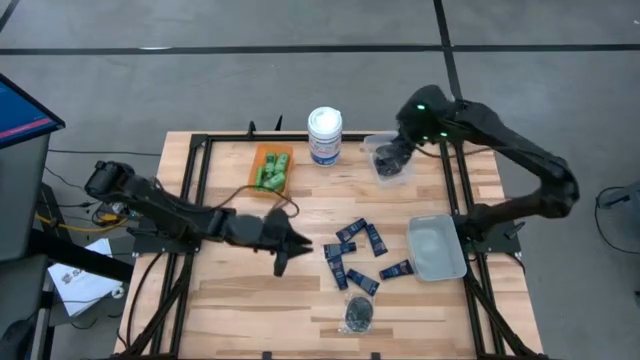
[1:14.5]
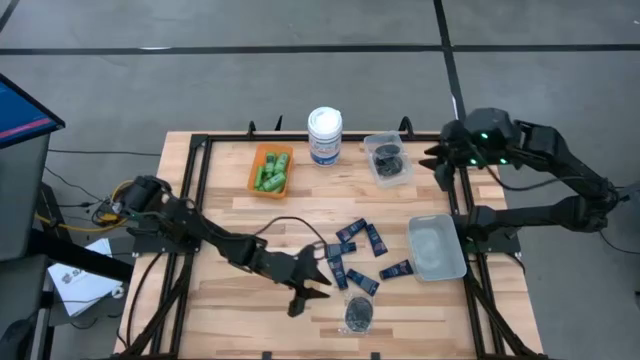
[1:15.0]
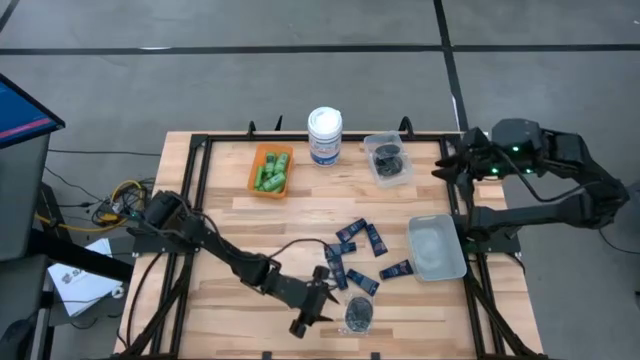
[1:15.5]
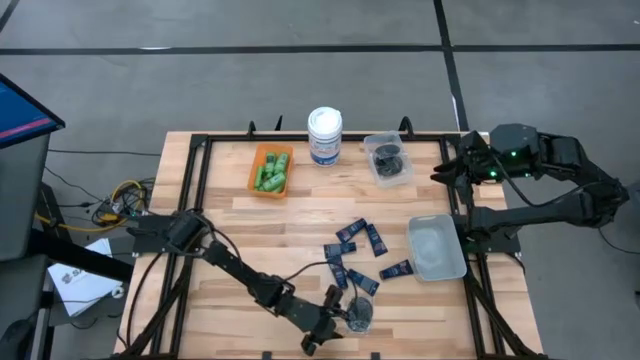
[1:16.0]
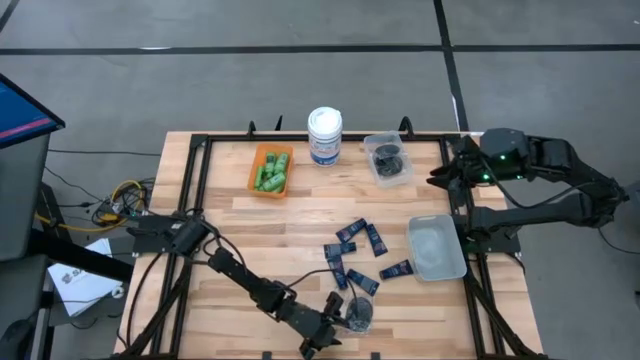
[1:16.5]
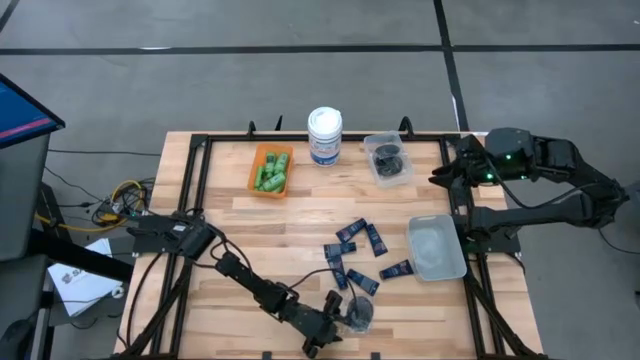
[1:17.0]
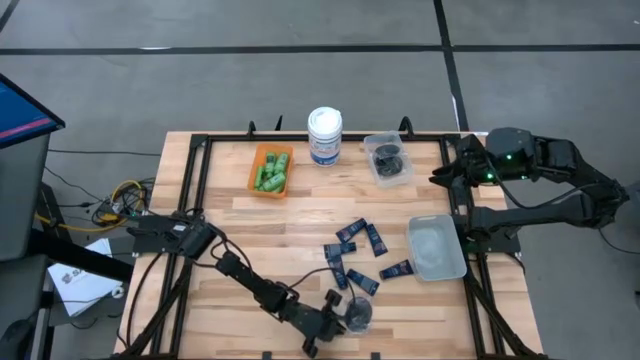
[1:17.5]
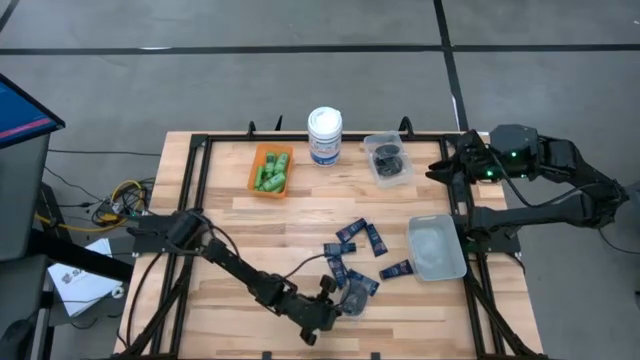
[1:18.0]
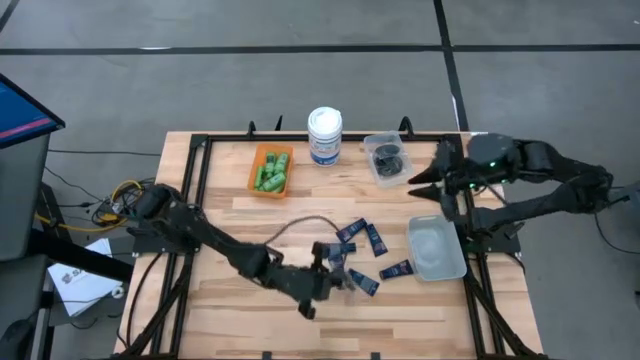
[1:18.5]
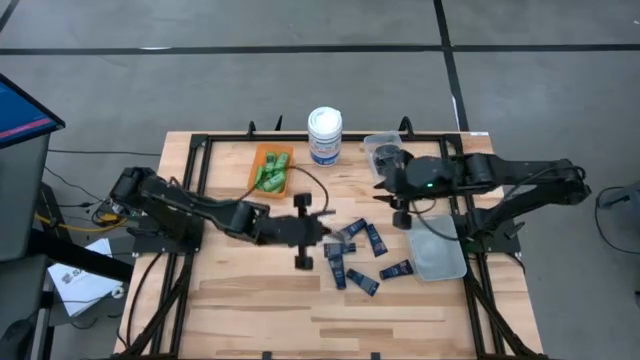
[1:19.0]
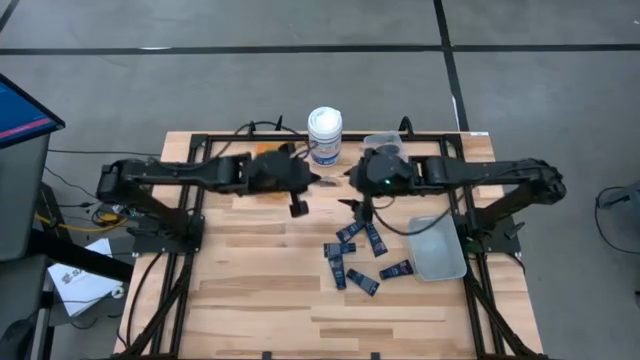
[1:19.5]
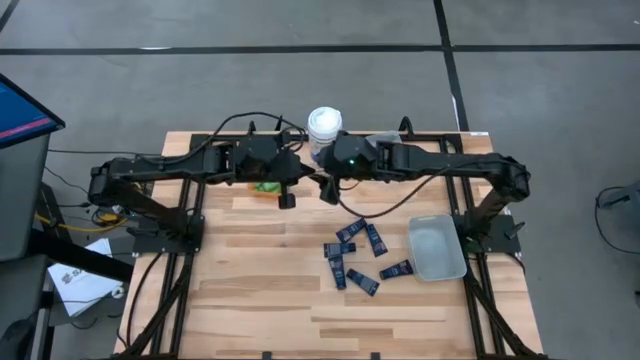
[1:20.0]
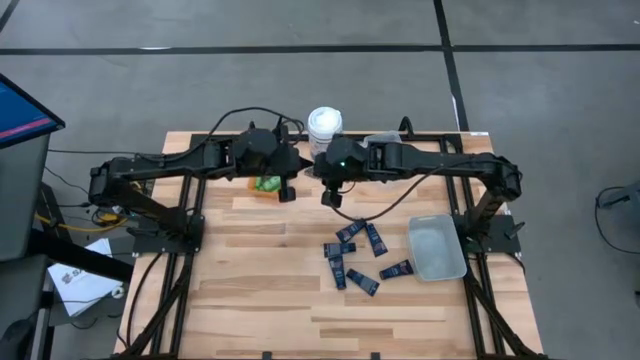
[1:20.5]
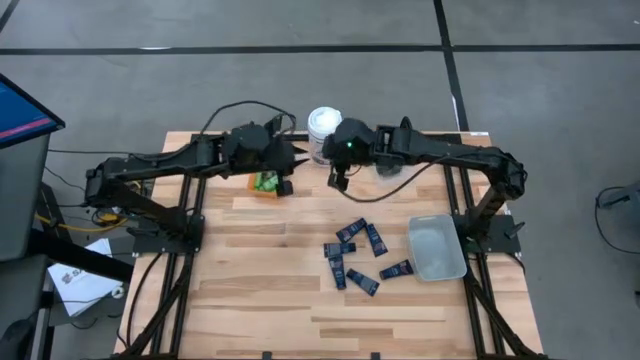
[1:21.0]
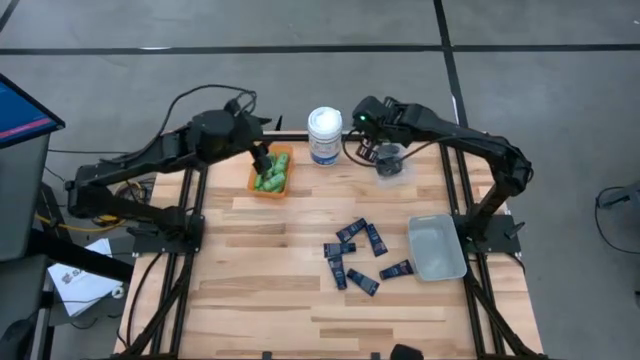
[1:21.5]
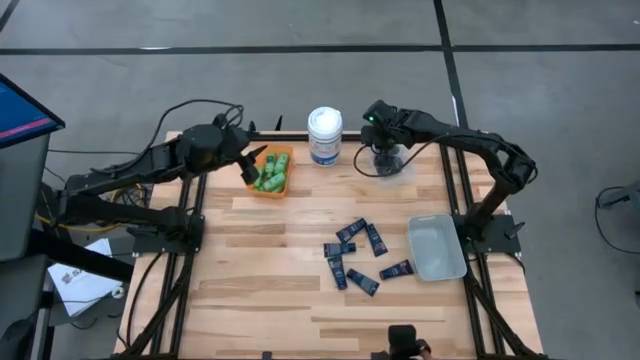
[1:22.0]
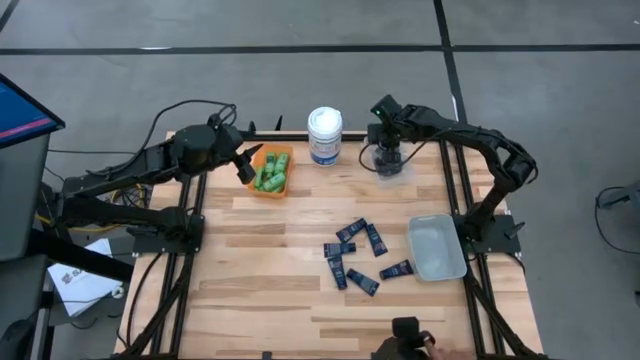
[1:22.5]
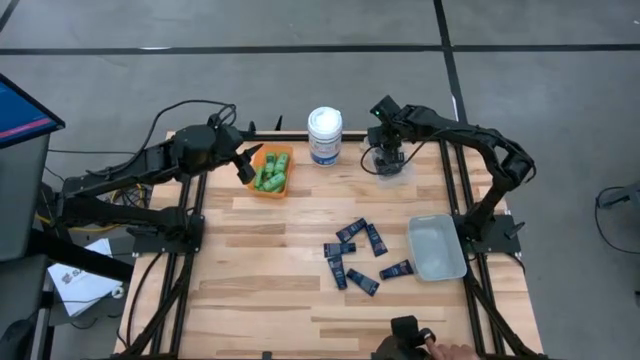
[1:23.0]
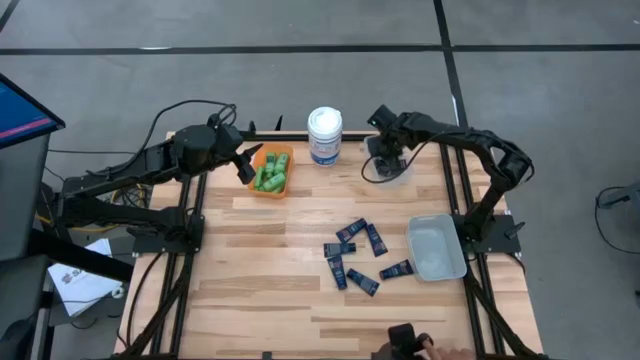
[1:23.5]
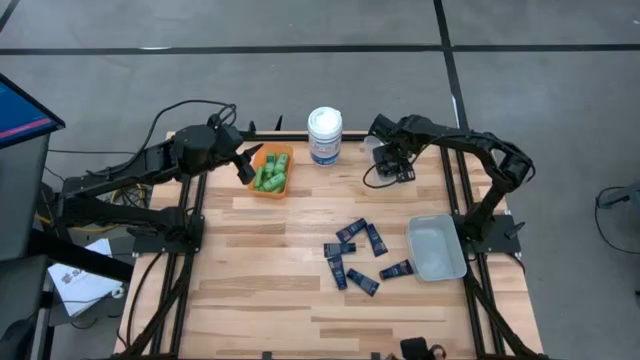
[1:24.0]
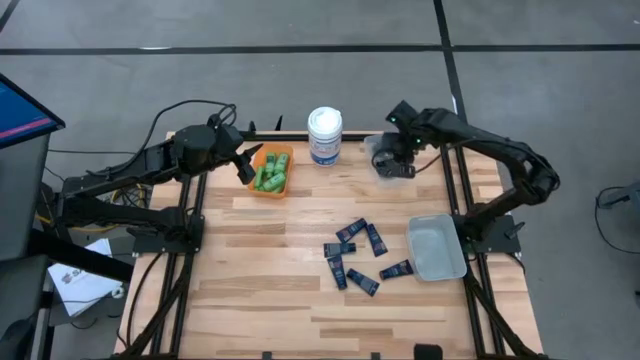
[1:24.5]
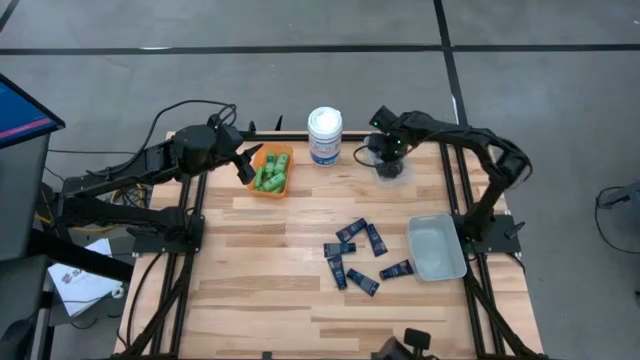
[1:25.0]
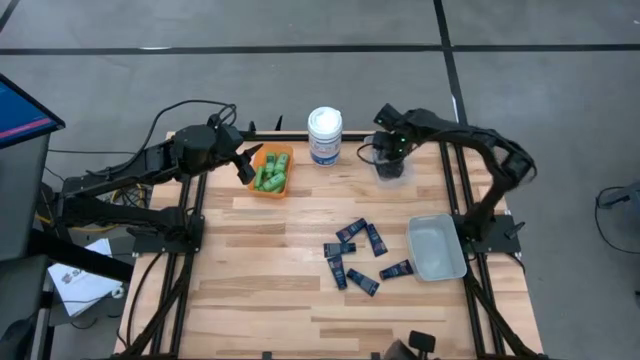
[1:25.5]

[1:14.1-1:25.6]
Task: Pick & Place Travel size toiletries
Put the black hairbrush into the white bin

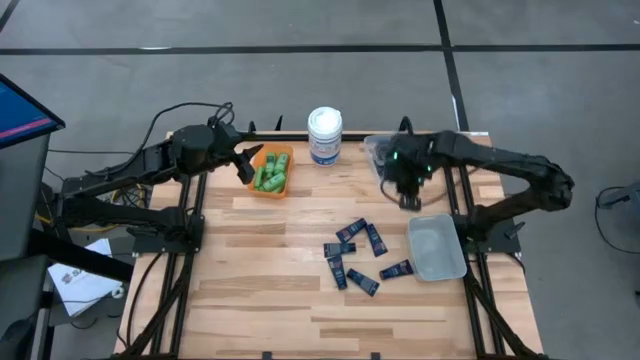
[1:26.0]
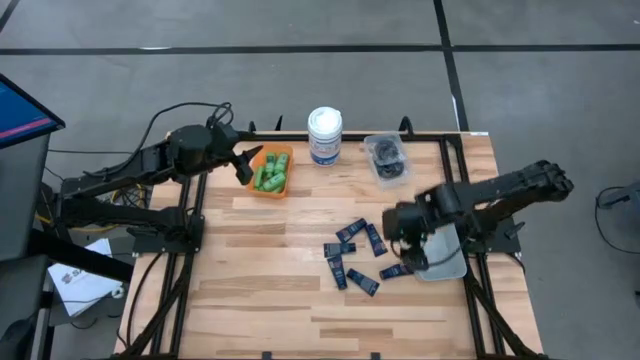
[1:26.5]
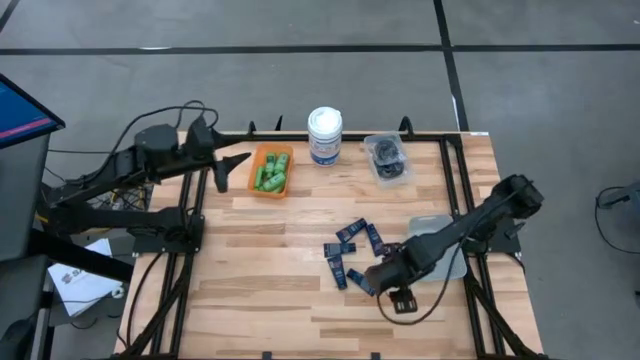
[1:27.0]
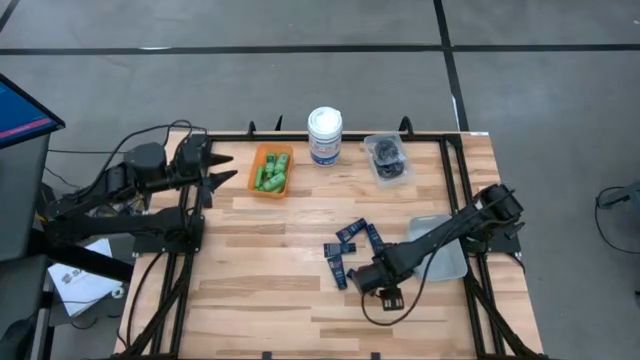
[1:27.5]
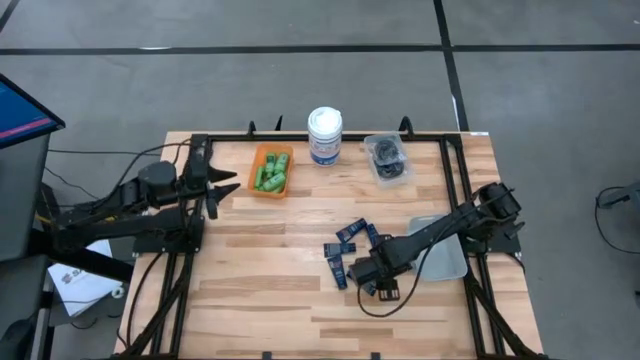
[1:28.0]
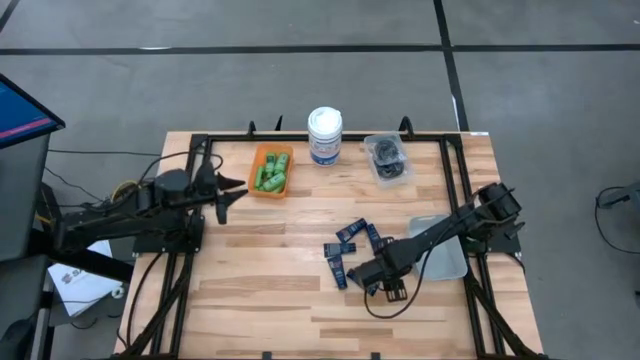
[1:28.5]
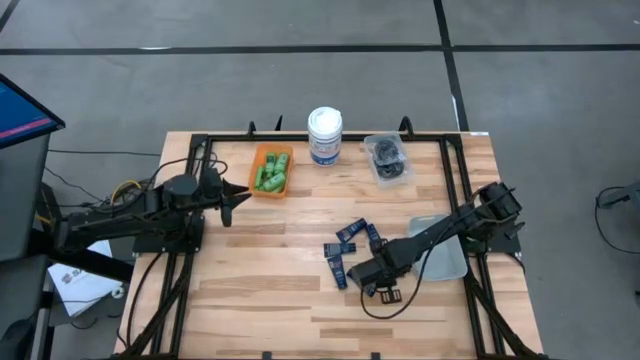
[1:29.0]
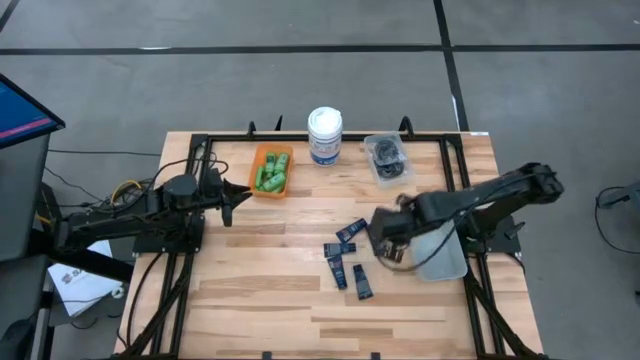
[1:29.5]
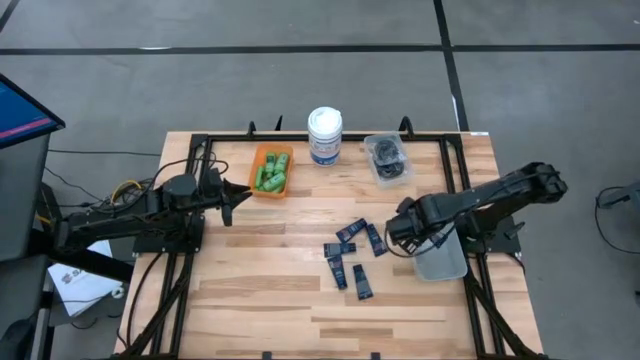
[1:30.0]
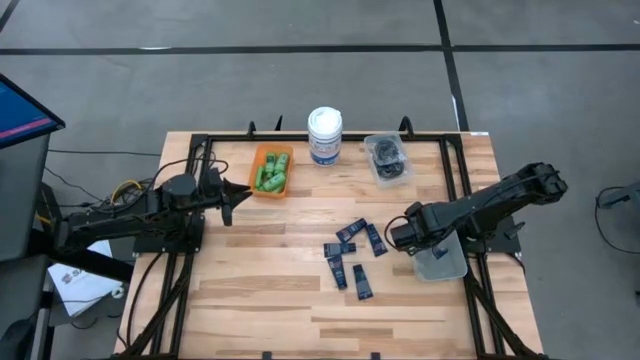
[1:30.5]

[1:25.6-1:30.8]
Put the blue shave cream into the gray bin

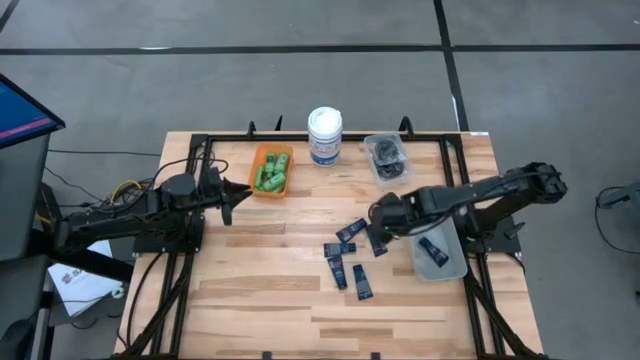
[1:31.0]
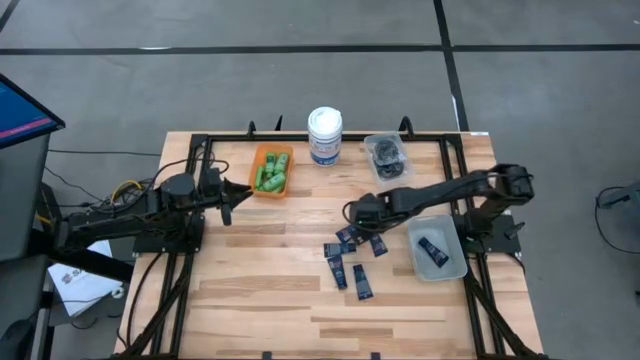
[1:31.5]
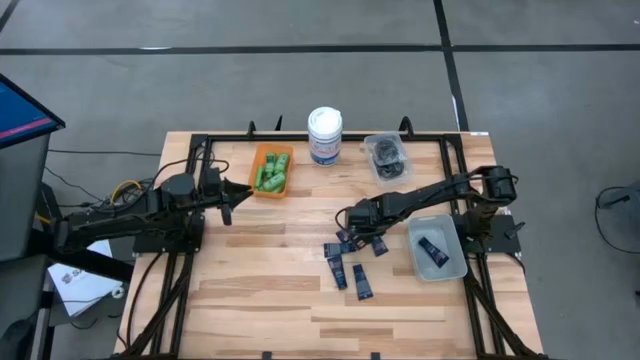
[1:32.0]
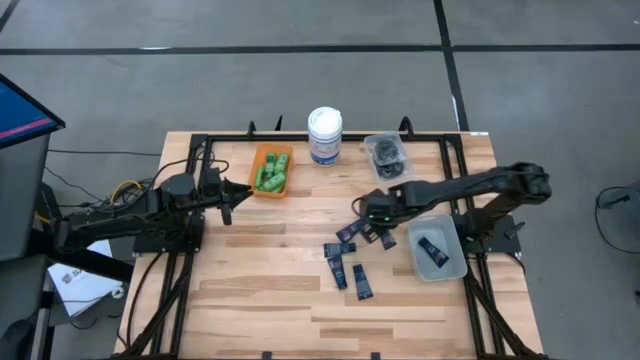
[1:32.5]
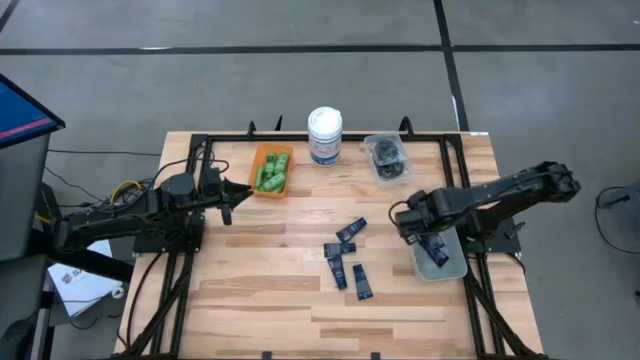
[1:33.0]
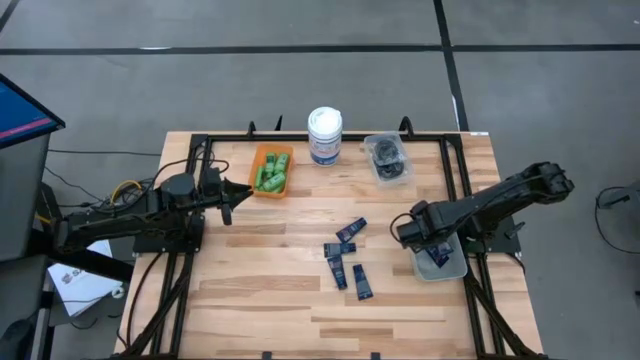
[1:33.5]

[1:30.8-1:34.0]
Put the blue shave cream into the gray bin

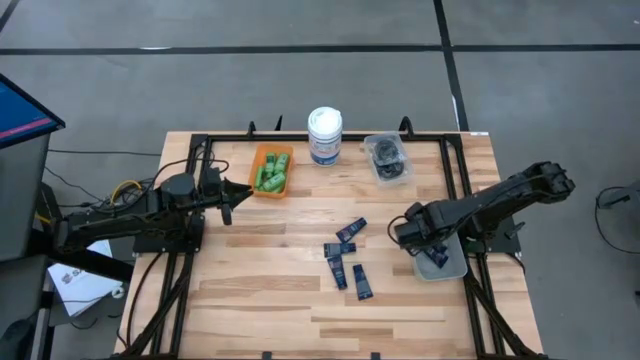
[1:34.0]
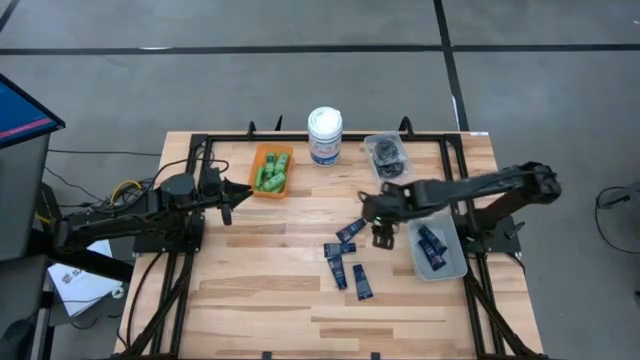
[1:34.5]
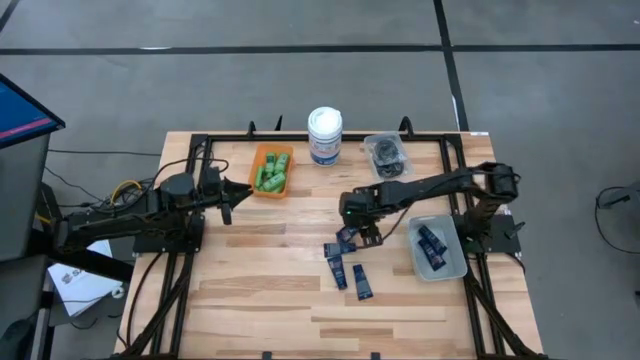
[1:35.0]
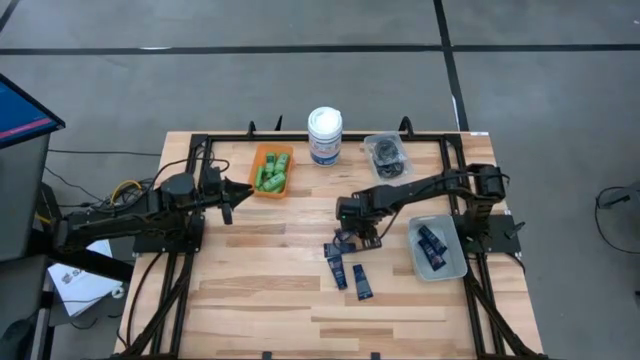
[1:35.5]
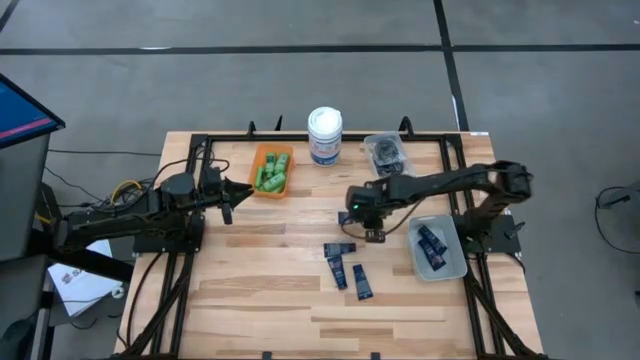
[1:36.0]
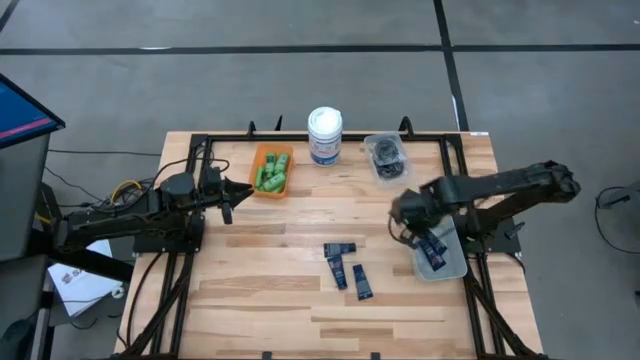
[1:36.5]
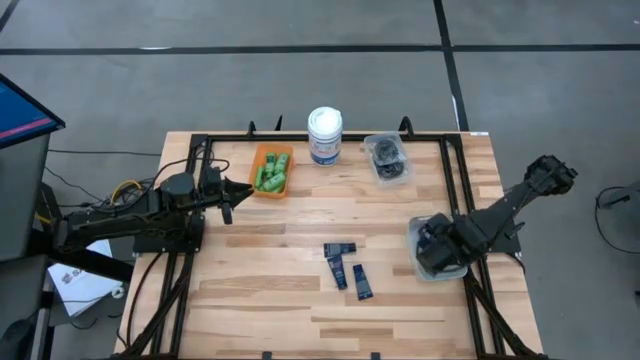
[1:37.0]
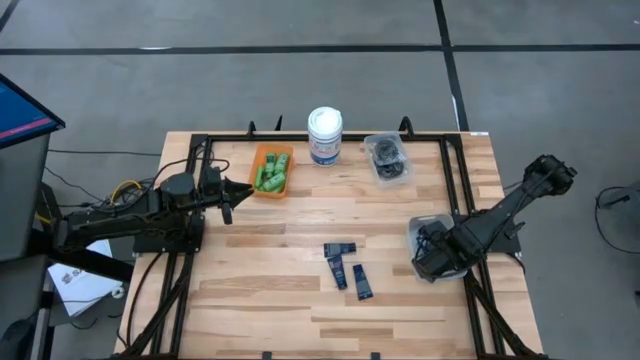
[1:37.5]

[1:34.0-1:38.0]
Put the blue shave cream into the gray bin
